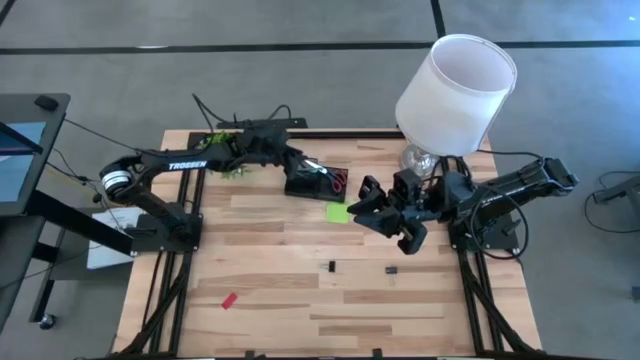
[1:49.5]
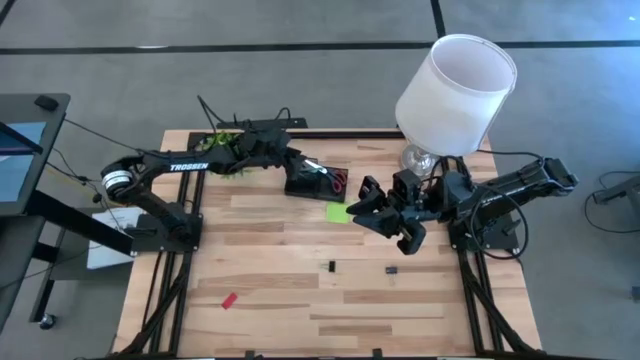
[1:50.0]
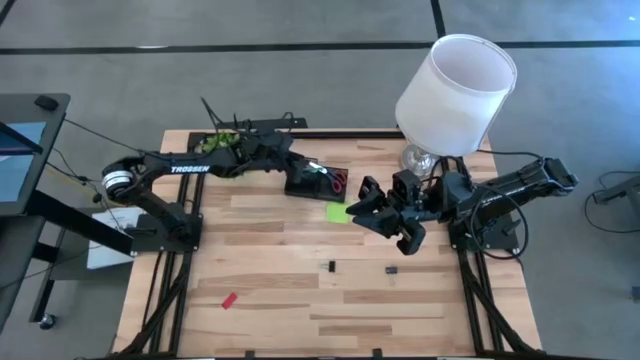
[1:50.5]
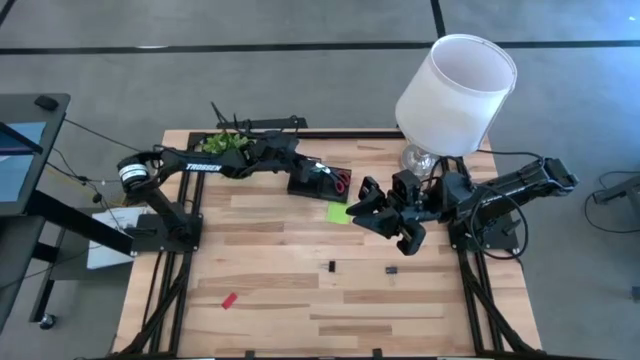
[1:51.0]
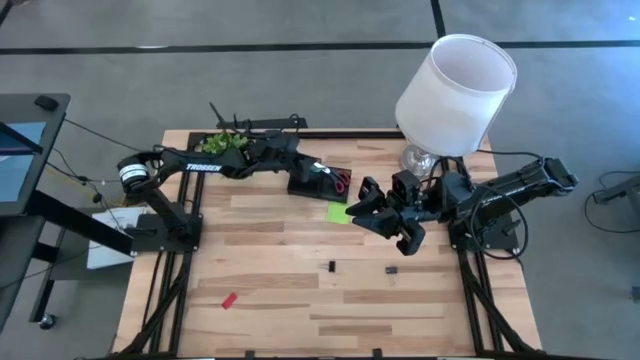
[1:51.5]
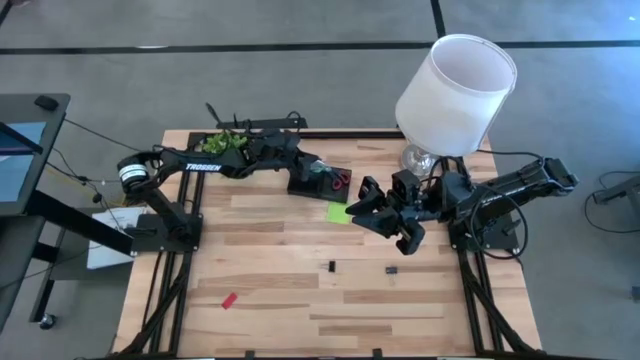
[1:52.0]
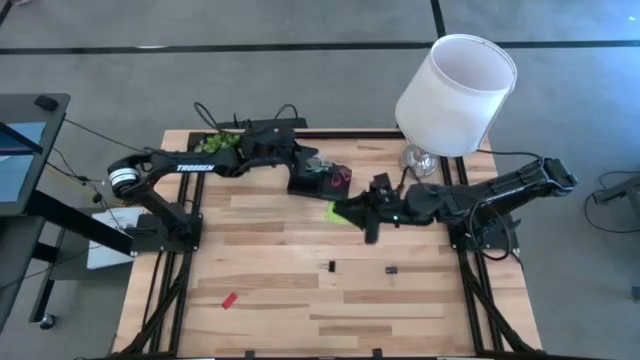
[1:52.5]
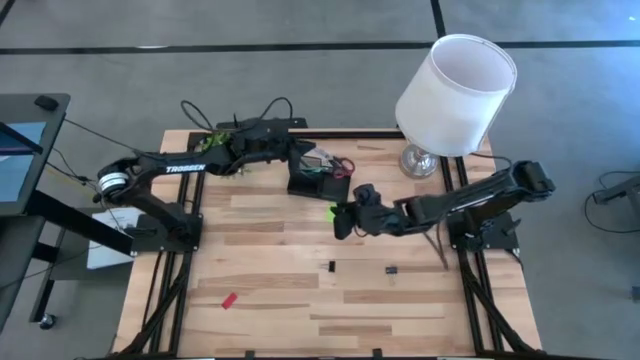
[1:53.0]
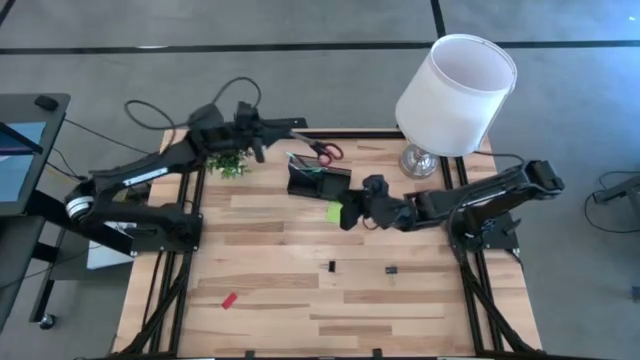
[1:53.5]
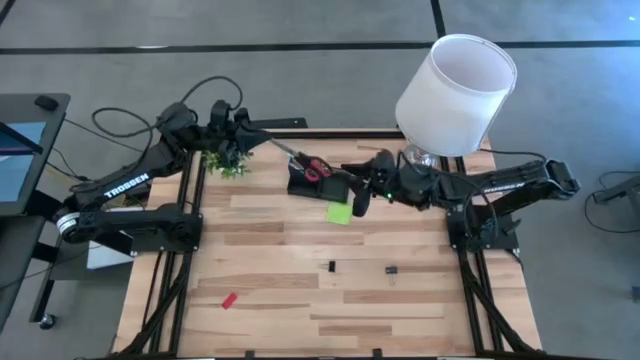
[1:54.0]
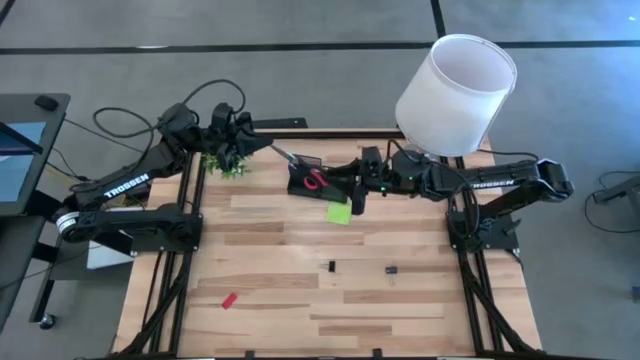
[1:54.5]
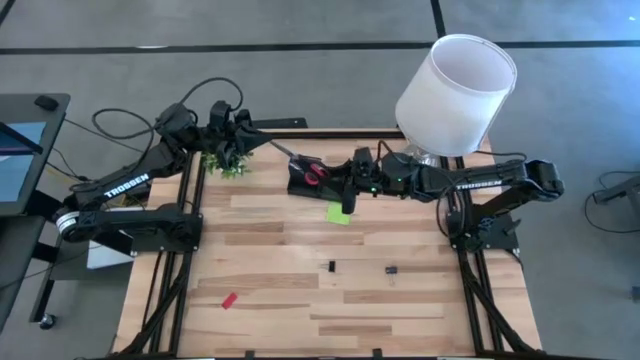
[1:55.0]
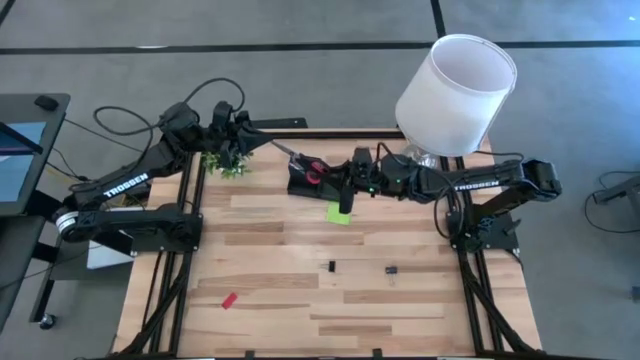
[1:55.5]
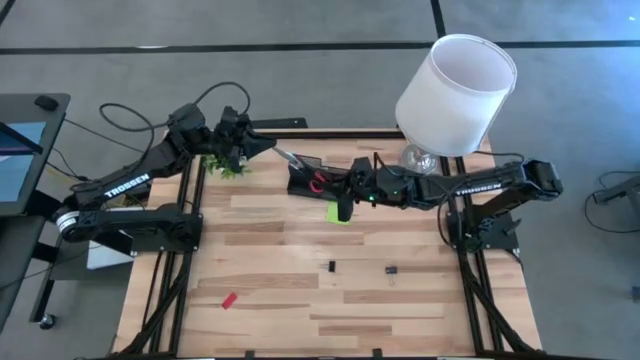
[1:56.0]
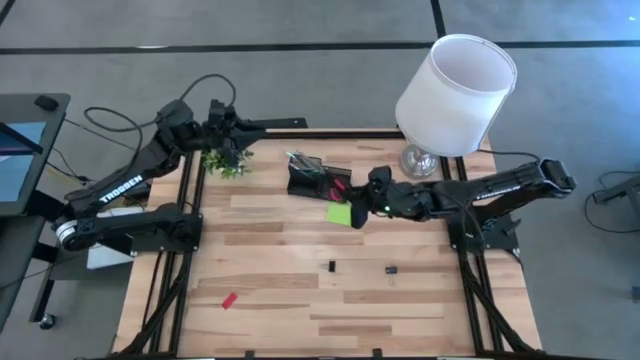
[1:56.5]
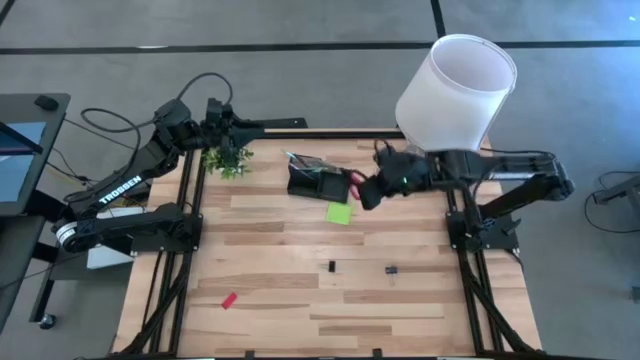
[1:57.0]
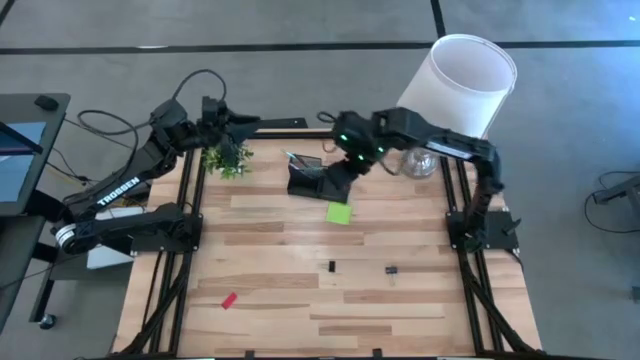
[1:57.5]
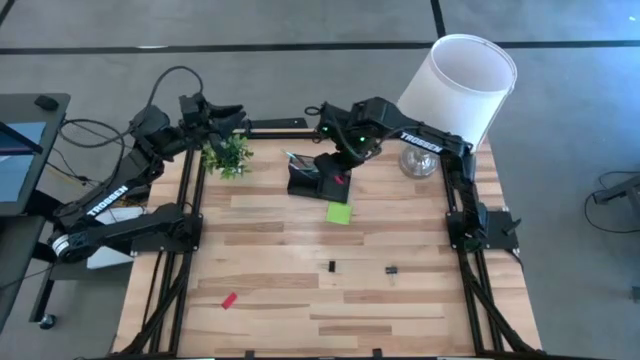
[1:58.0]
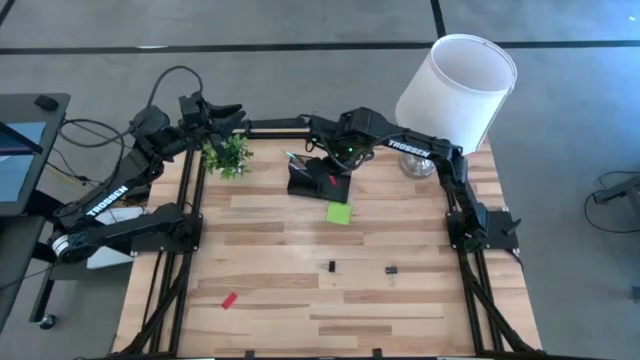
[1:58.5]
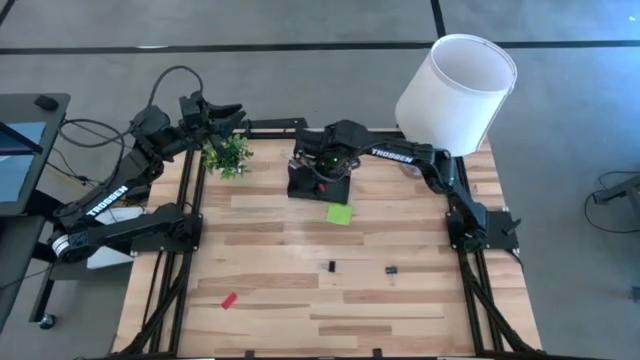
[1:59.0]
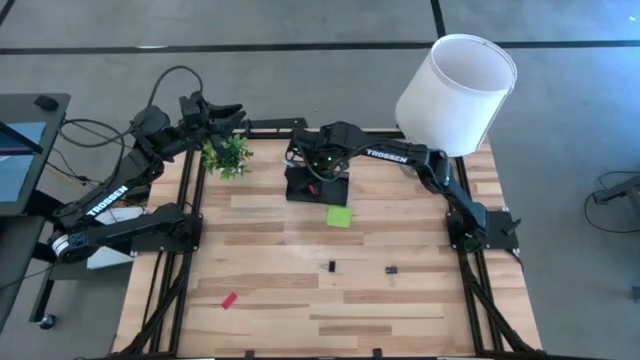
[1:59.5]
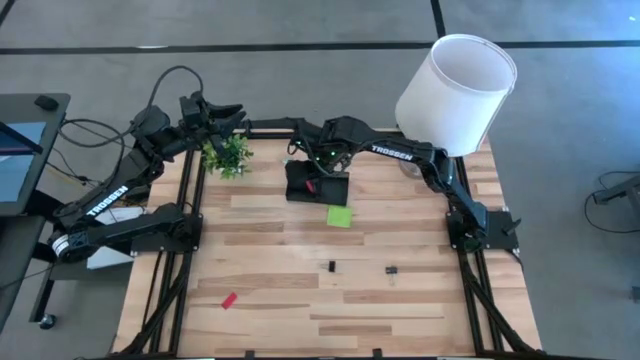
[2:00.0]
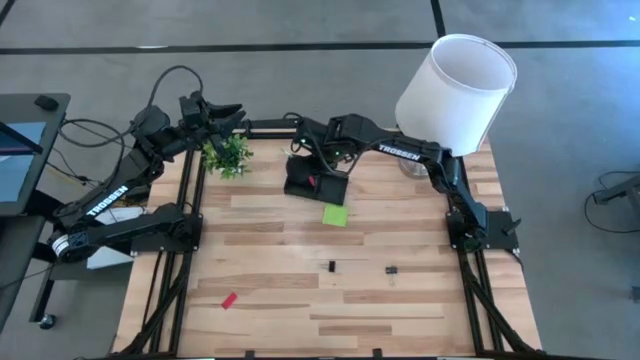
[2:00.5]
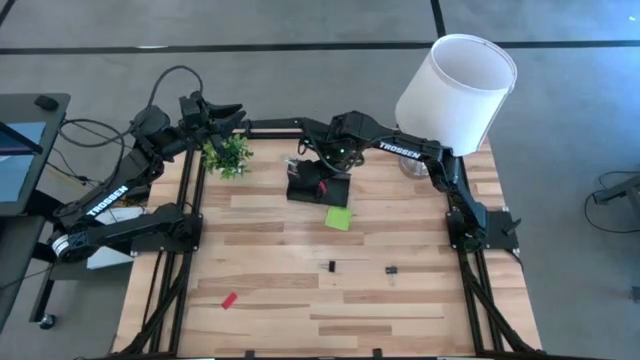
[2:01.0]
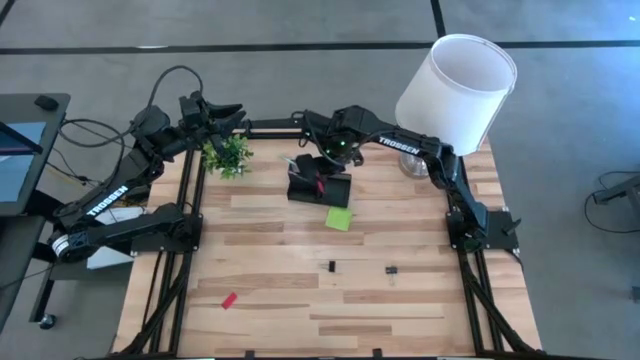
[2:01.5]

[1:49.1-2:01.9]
Task: Pick and place office supplies into organizer
Put the black scissor into the black desk organizer

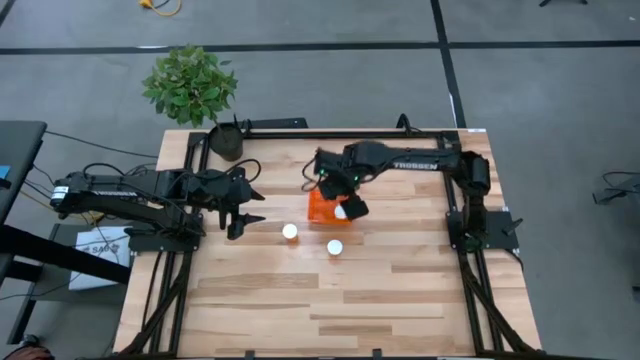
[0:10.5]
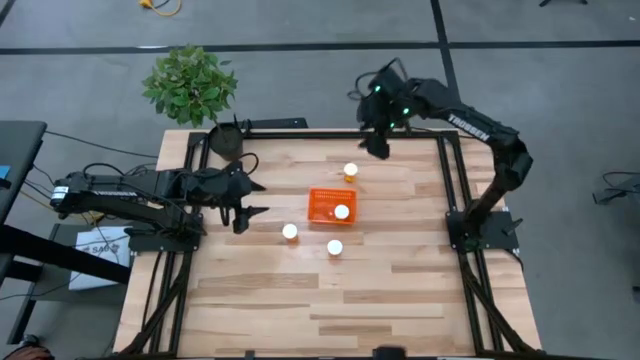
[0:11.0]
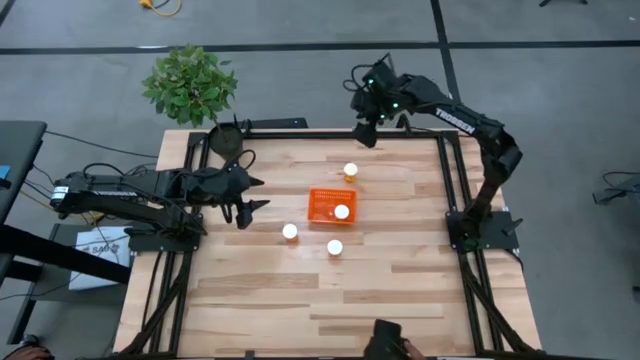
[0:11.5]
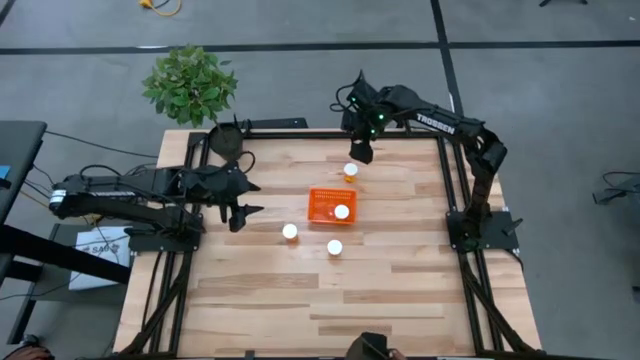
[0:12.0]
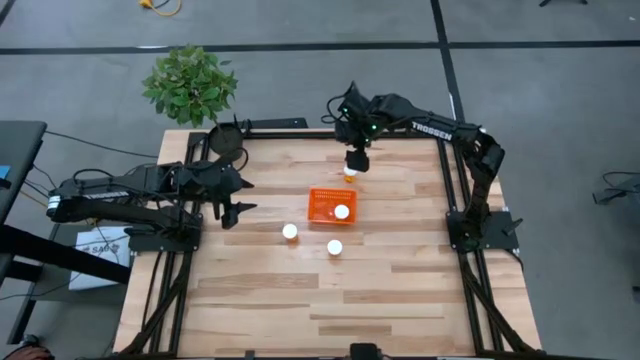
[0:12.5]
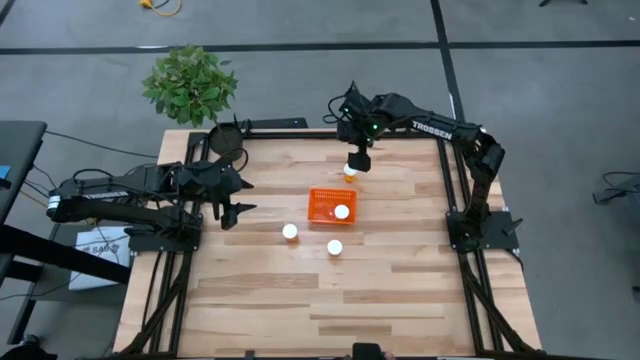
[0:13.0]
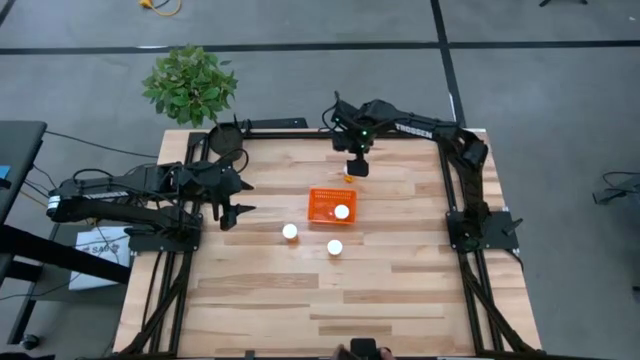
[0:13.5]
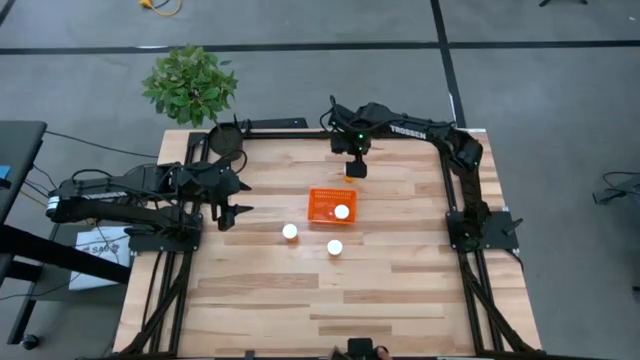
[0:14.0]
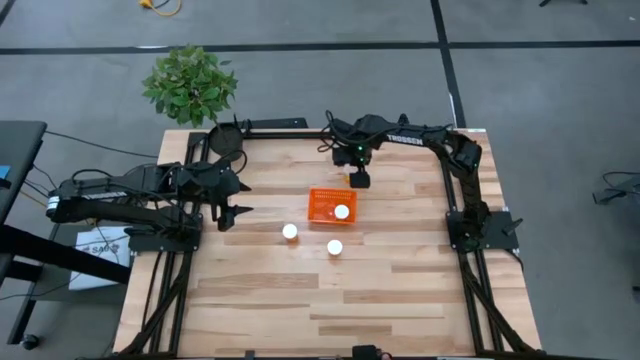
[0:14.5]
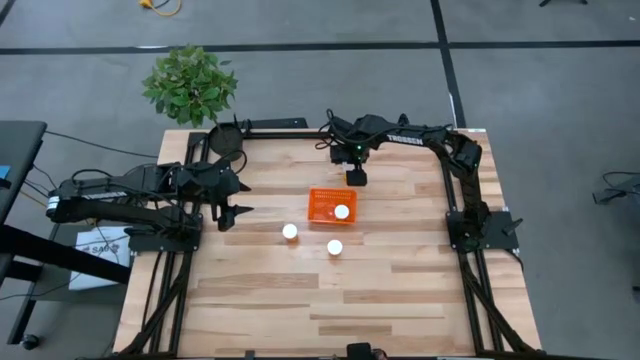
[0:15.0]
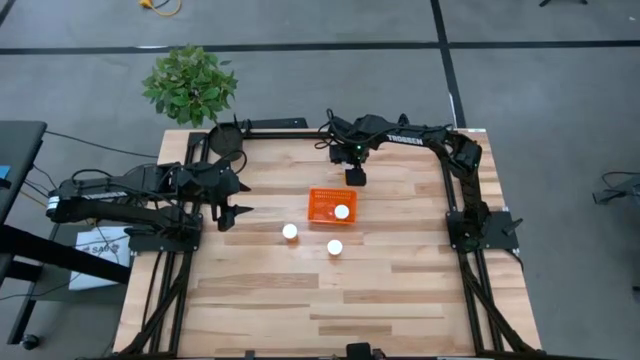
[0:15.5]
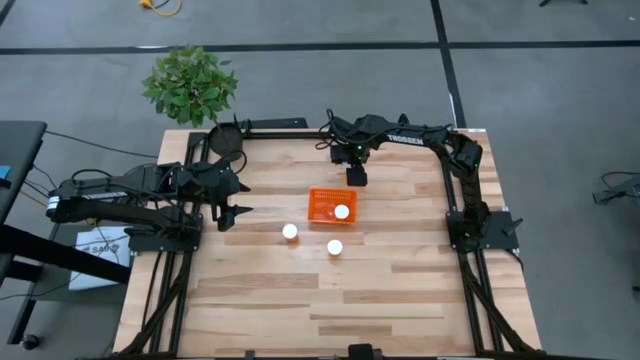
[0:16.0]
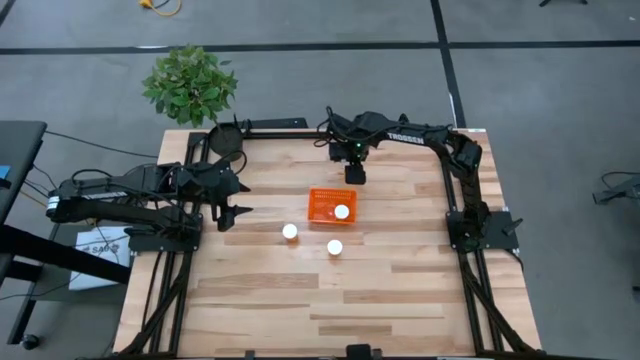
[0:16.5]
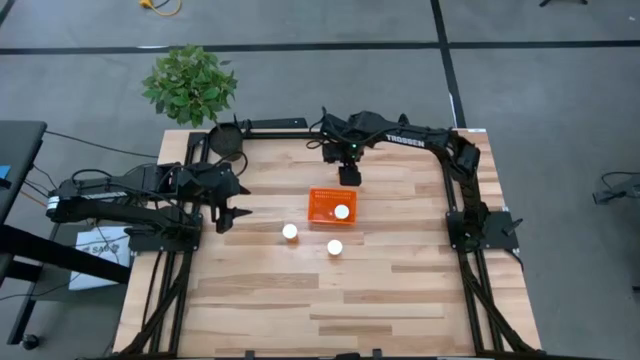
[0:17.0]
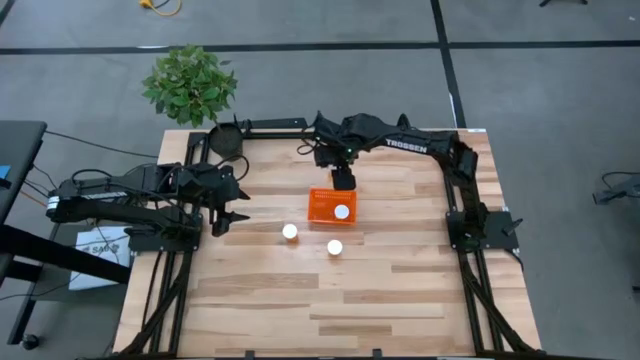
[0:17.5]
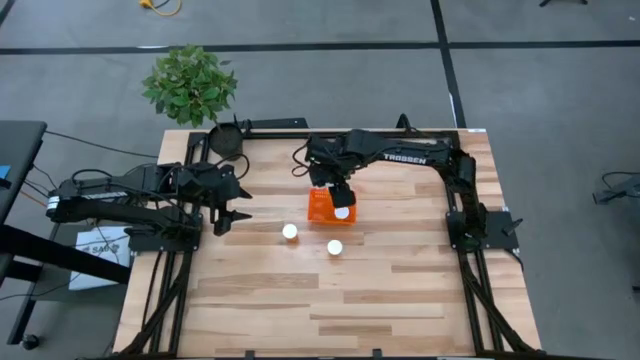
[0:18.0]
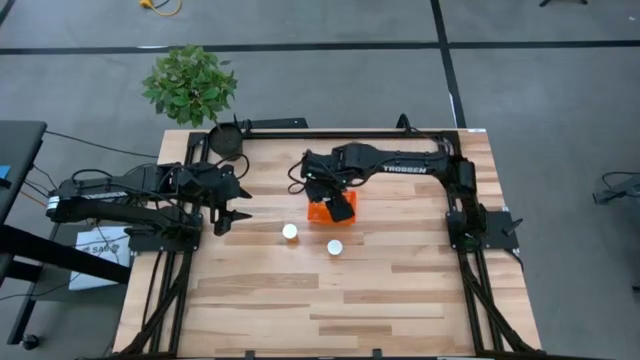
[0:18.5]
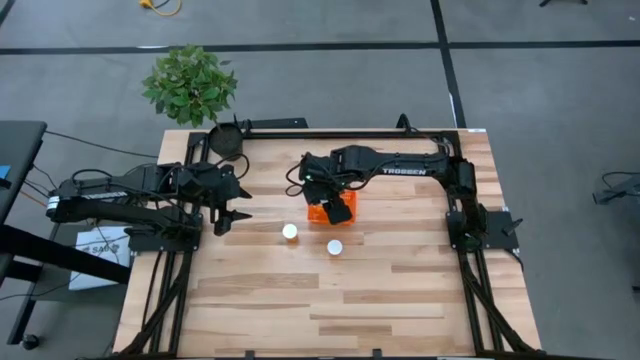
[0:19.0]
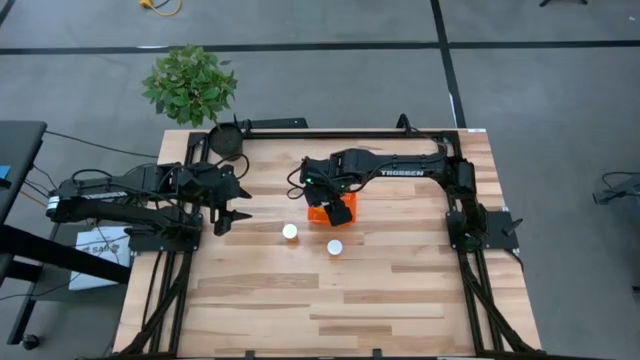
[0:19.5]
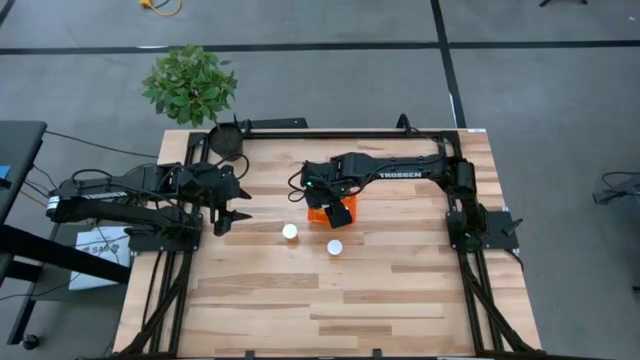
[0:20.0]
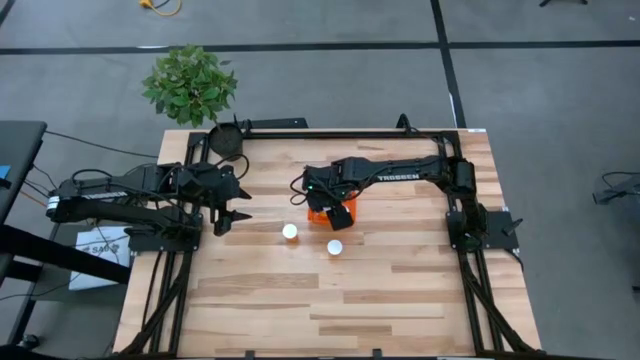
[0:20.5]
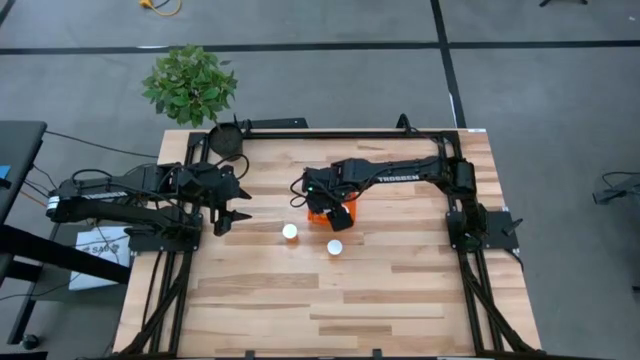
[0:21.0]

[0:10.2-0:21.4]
Task: Pick and place pill bottles into a basket
Put the orange pill bottle into the orange basket
